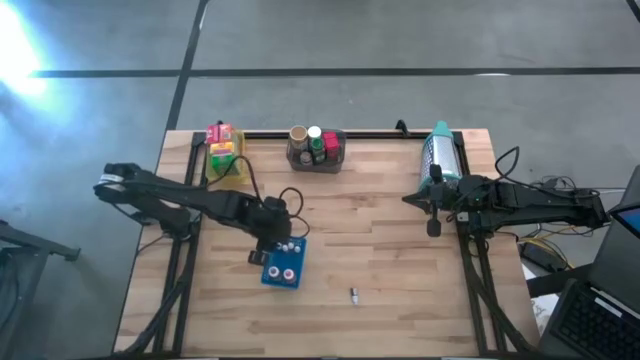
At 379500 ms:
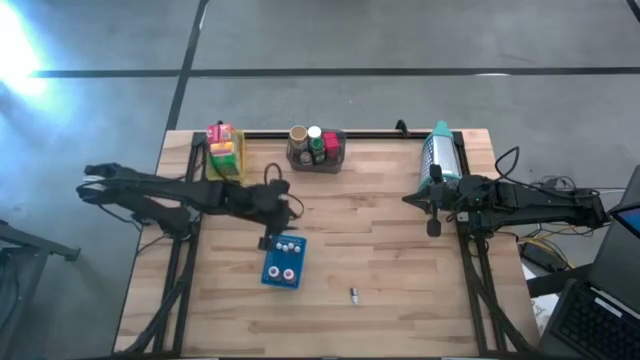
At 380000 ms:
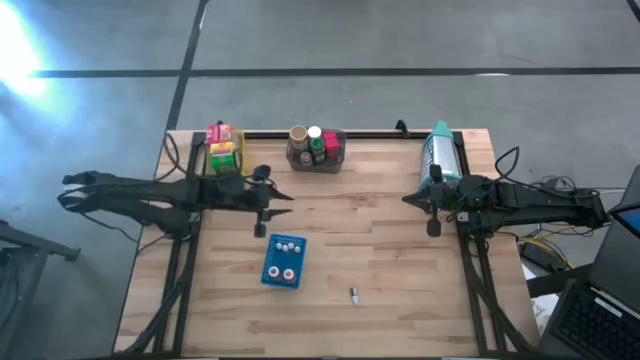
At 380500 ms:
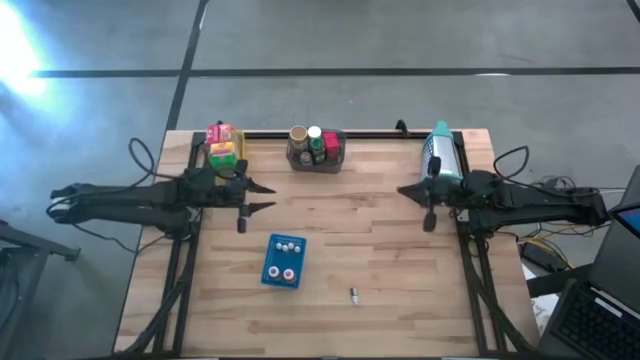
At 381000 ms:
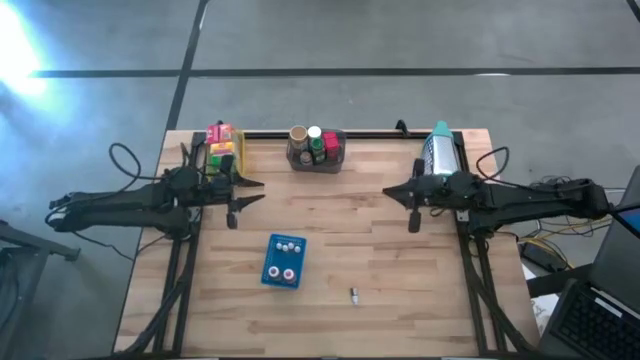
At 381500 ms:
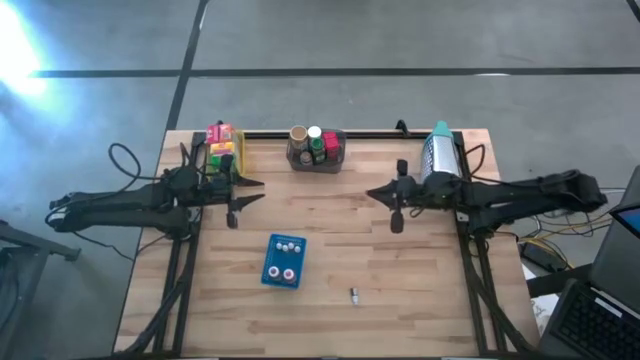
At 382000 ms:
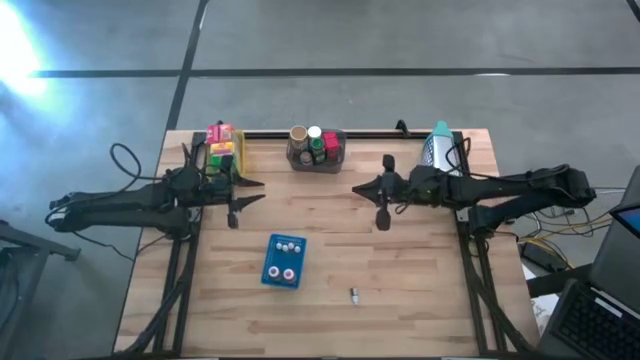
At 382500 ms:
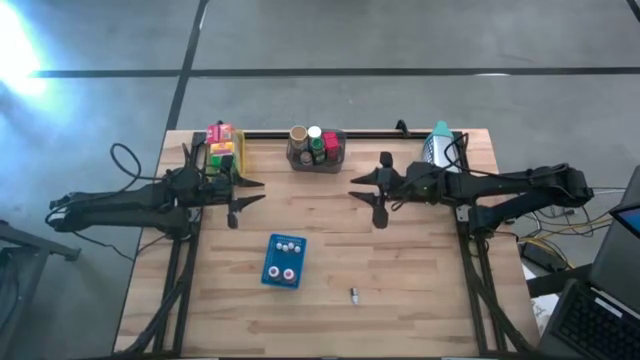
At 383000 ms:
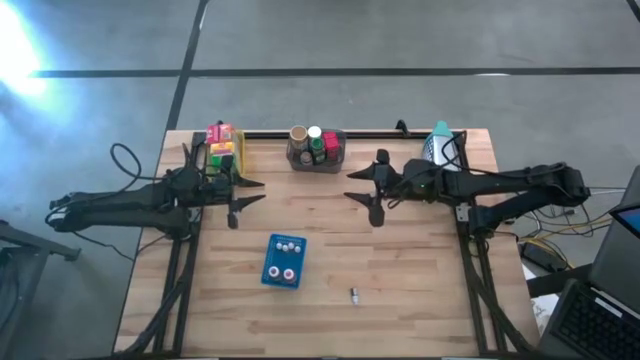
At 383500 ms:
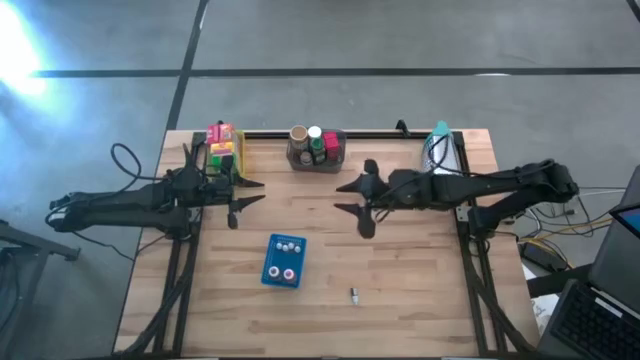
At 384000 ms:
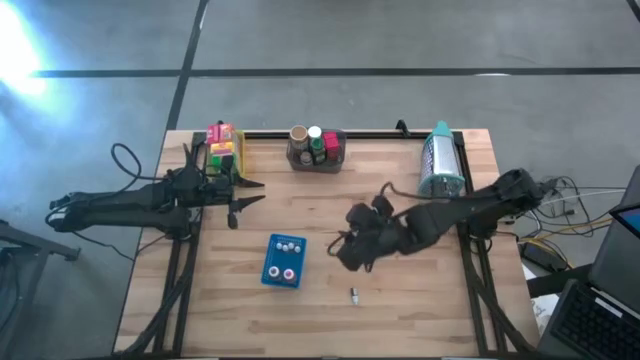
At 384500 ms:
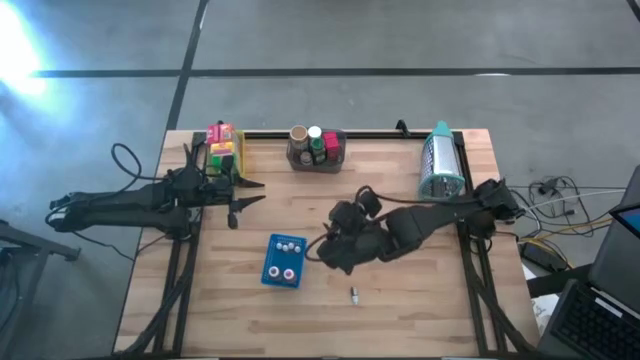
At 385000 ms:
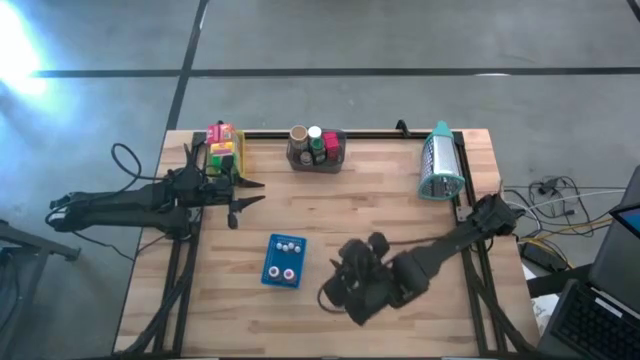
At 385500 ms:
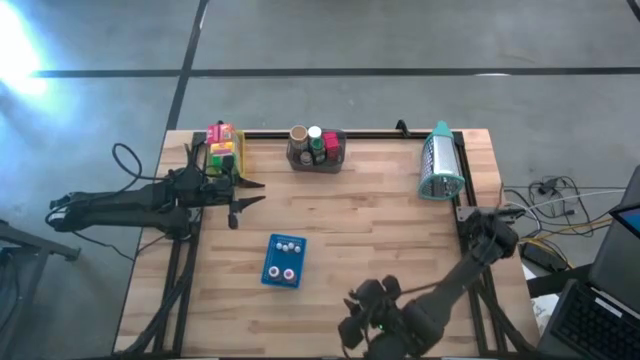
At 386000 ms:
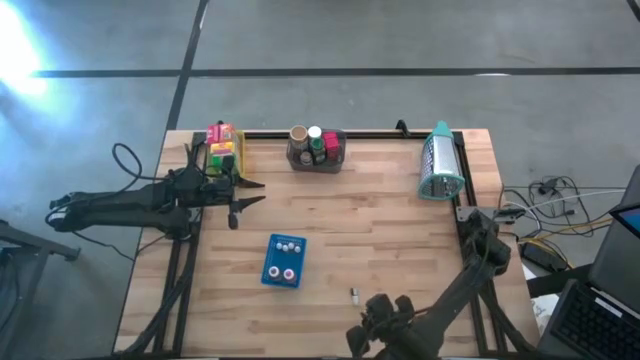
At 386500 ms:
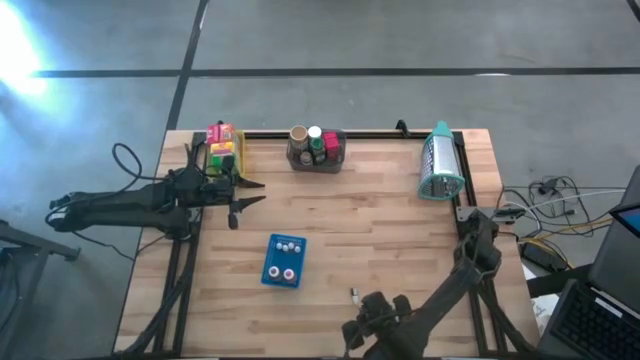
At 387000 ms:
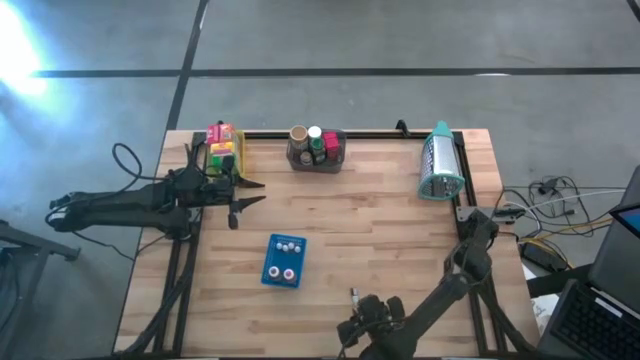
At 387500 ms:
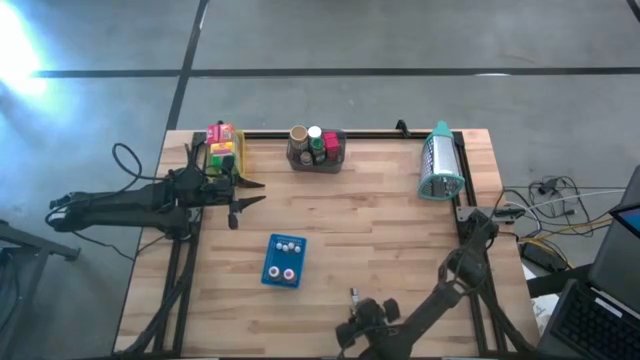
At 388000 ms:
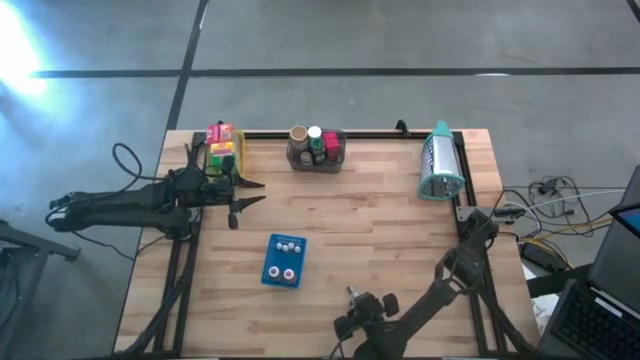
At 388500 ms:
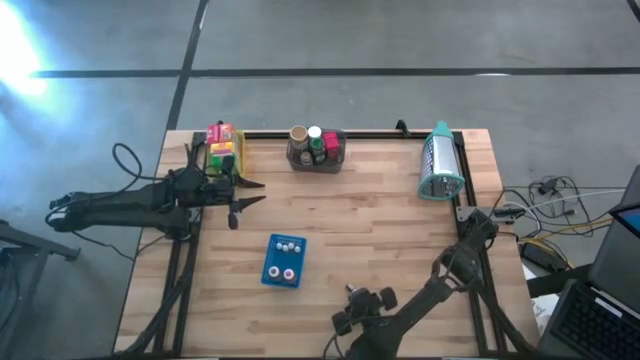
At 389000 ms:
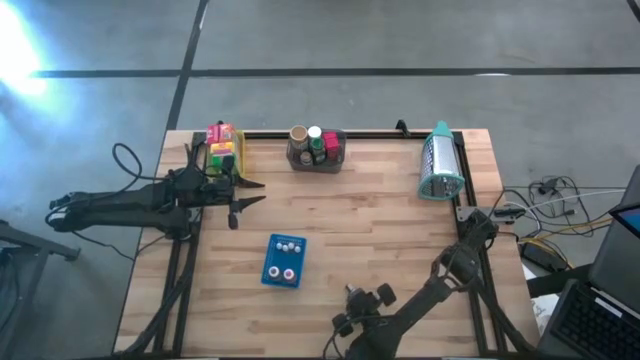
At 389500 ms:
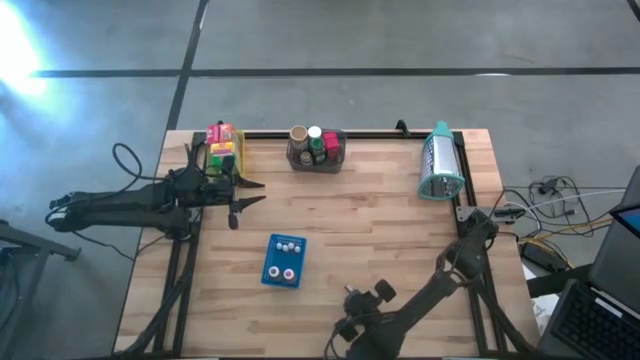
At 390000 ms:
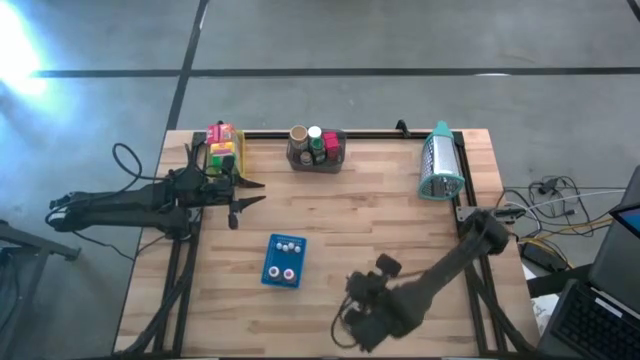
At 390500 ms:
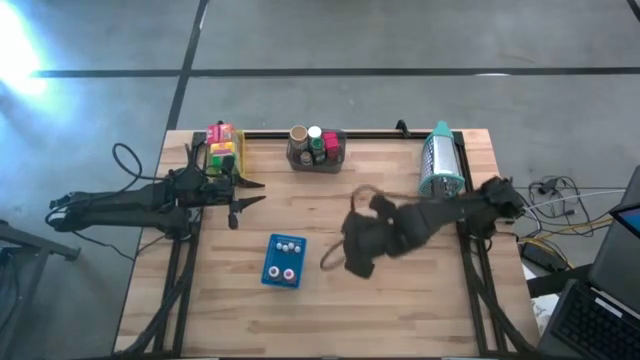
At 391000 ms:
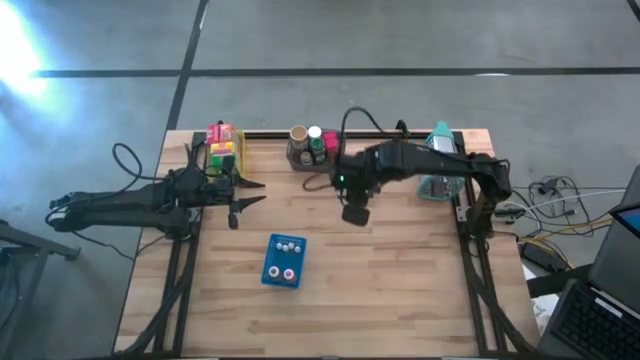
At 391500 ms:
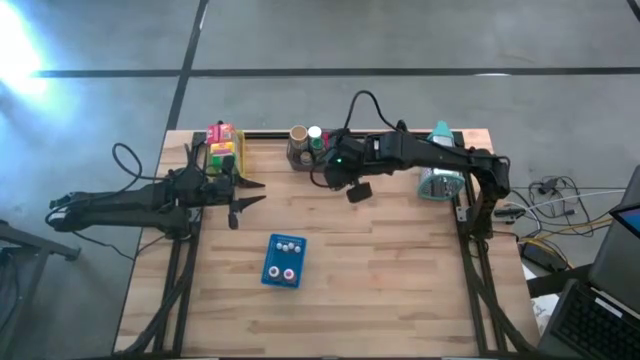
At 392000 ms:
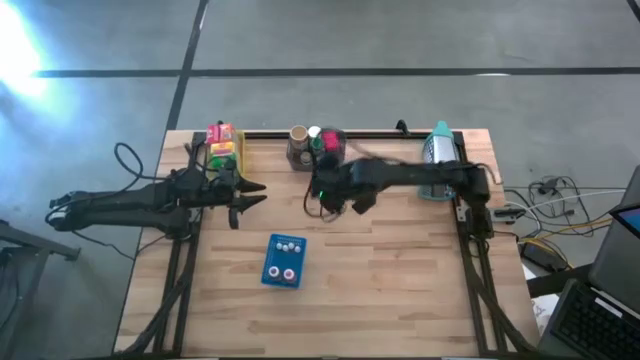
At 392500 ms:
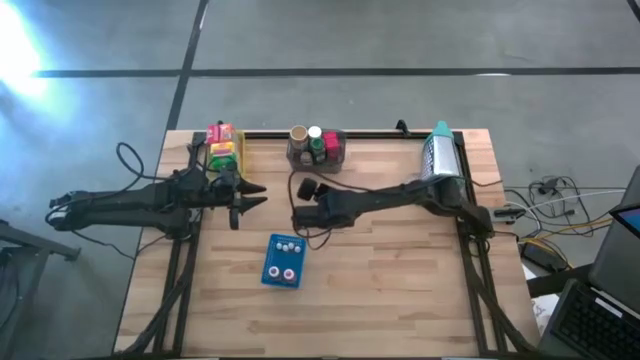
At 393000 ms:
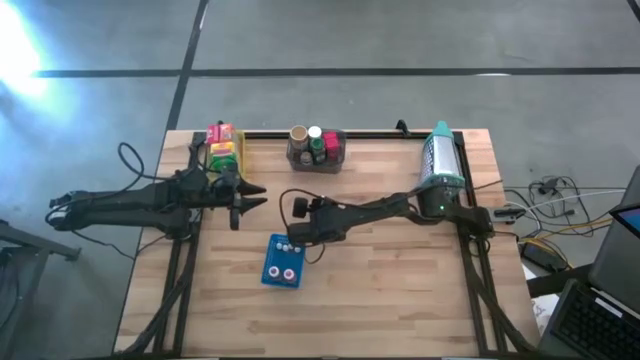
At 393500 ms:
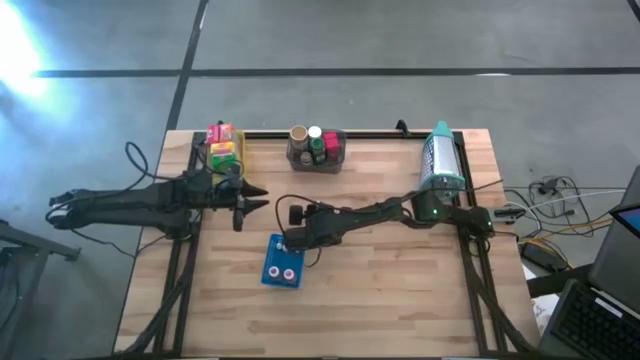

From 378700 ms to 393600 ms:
Task: Pick & Place Kitchen Items
Put the red food coloring bottle into the blue bin

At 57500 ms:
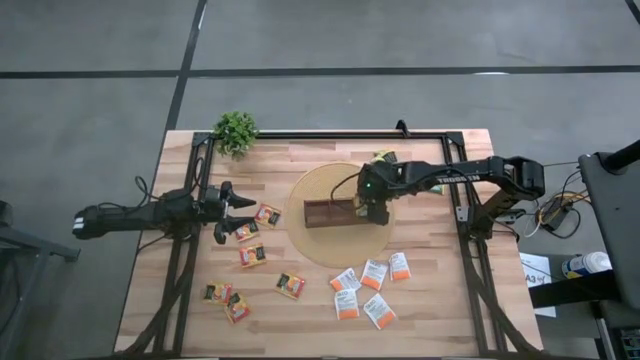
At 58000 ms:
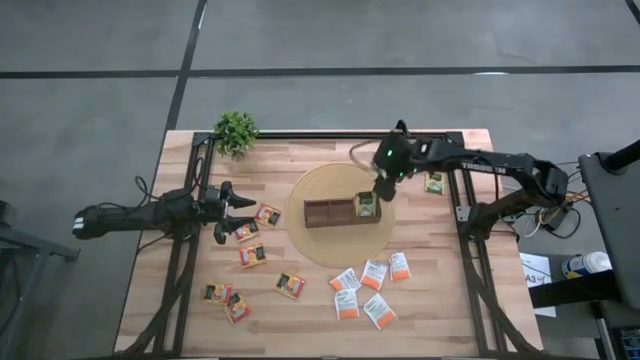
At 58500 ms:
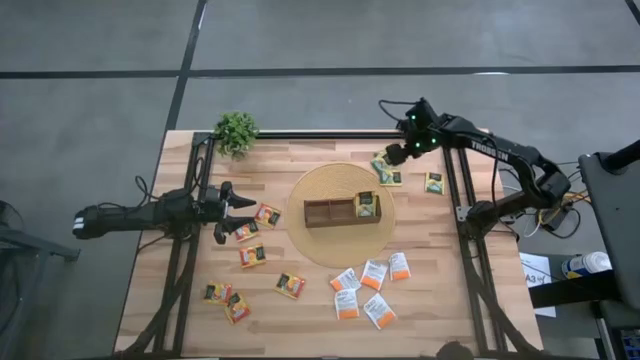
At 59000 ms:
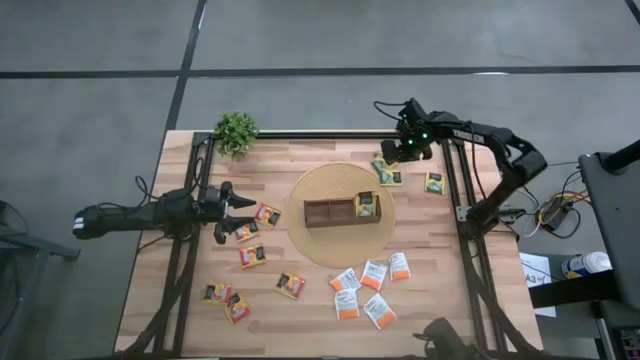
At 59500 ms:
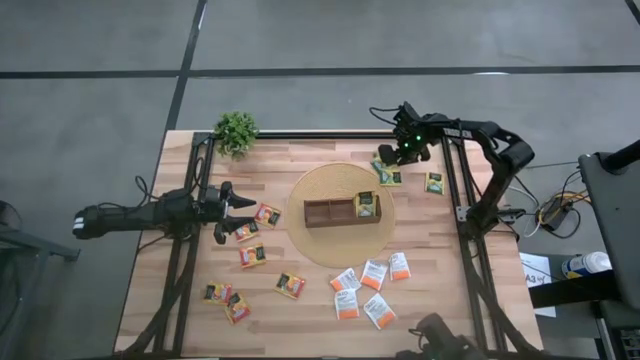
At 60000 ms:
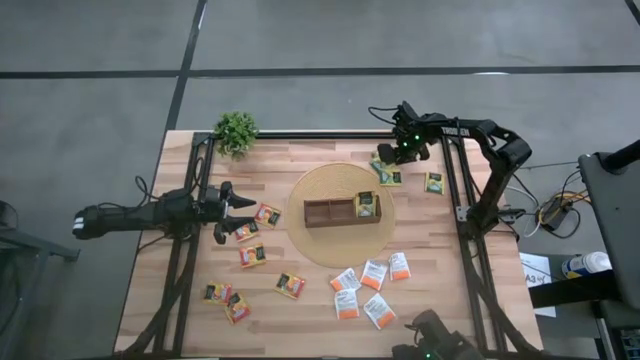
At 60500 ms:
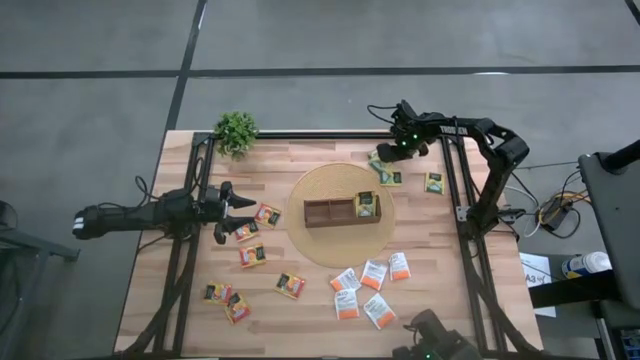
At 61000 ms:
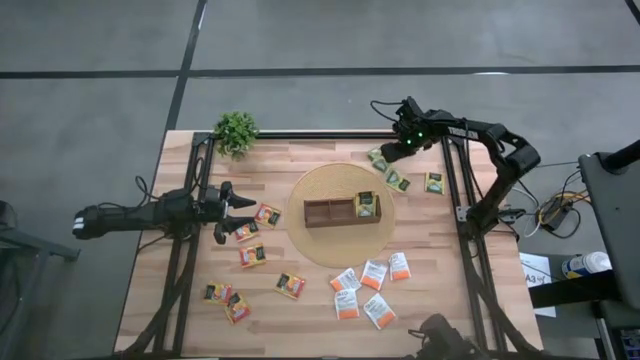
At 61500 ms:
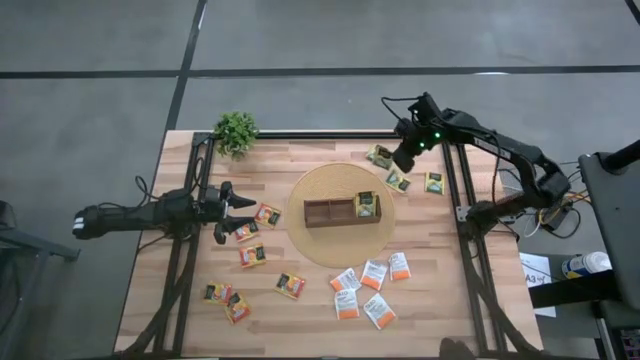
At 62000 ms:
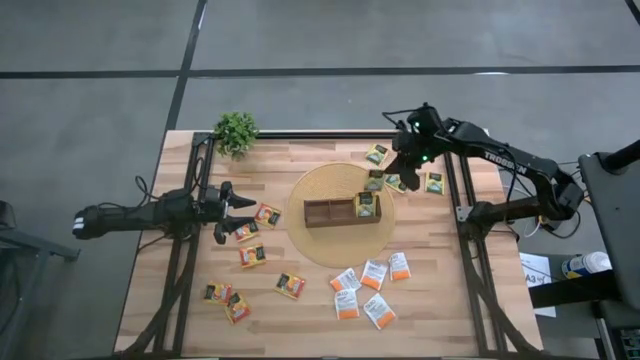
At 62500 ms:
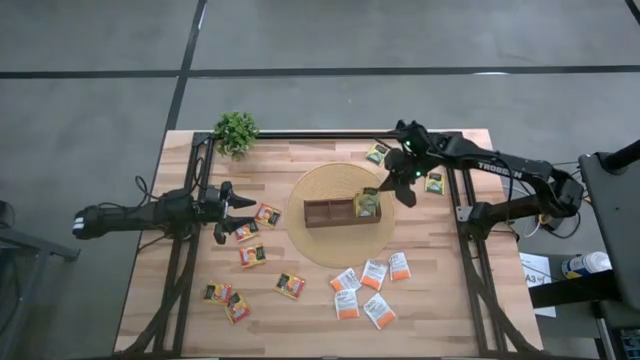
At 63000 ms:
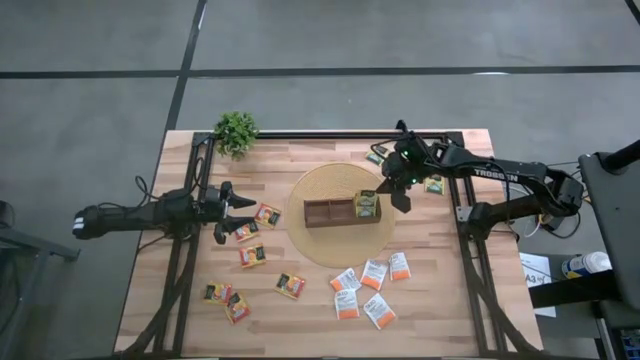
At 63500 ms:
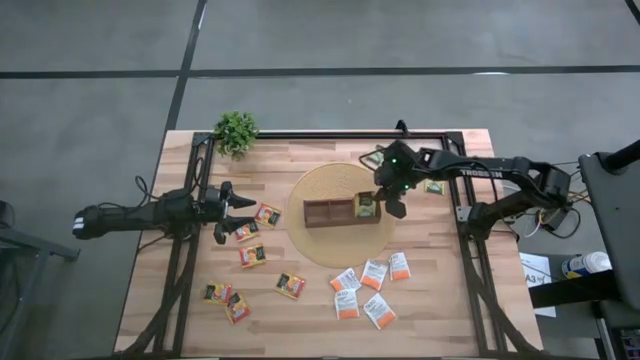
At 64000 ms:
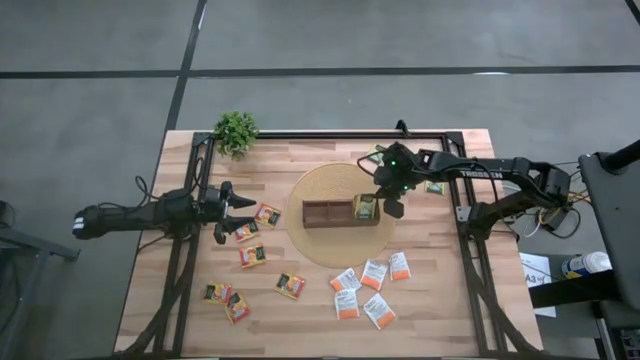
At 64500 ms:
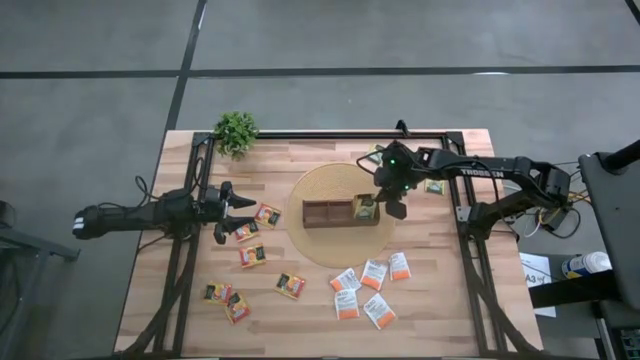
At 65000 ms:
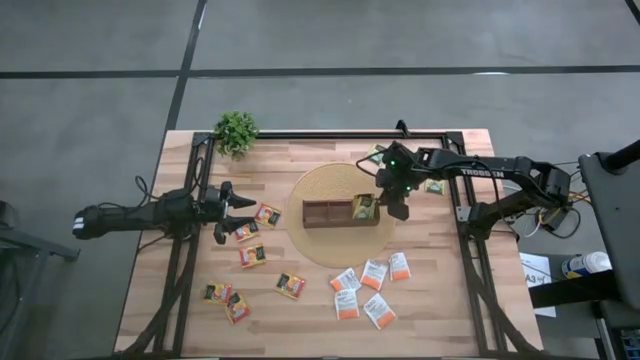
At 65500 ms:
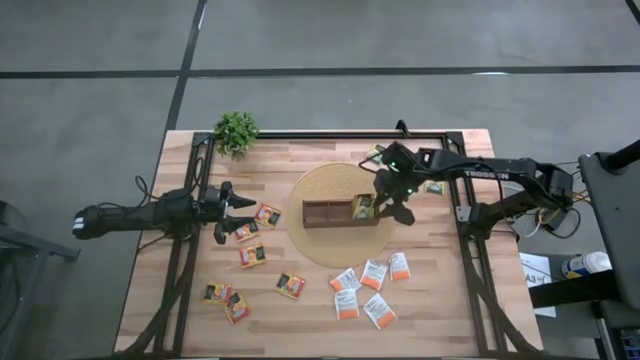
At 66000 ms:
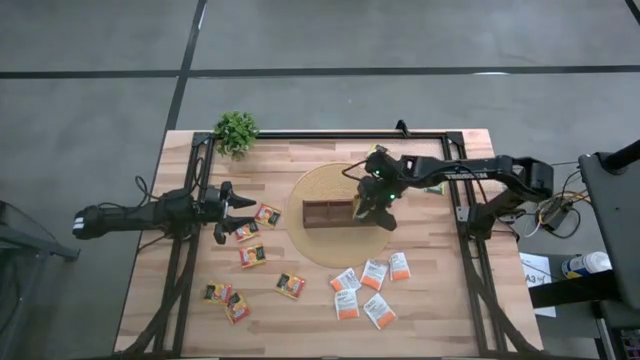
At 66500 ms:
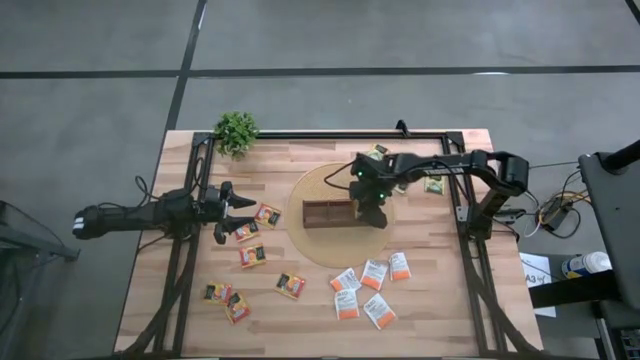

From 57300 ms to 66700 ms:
Task: Pick & Place Tea
Put the yellow tea bag into the right section of the wooden organizer
